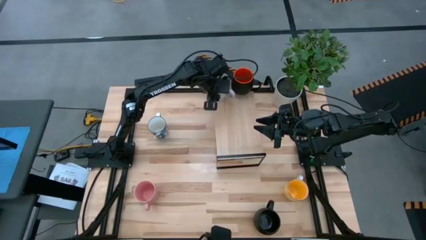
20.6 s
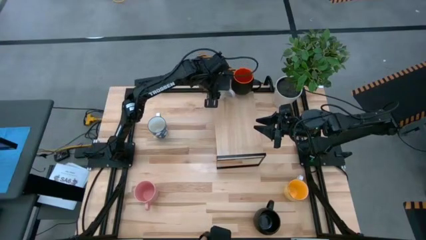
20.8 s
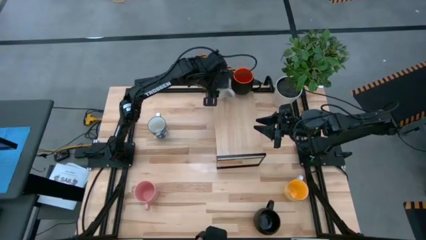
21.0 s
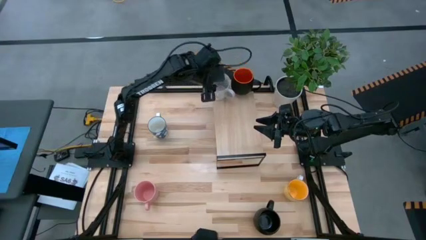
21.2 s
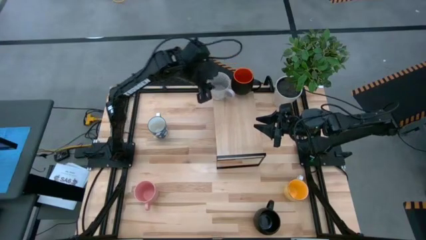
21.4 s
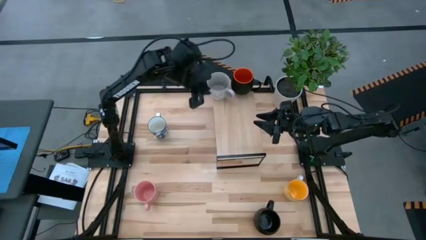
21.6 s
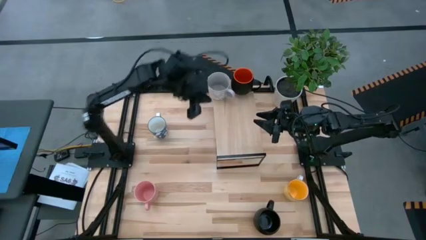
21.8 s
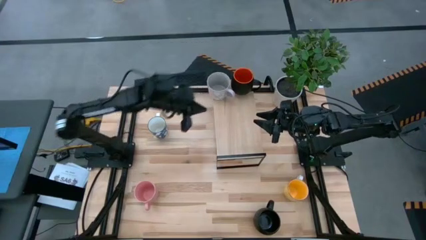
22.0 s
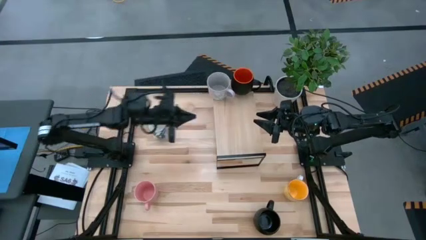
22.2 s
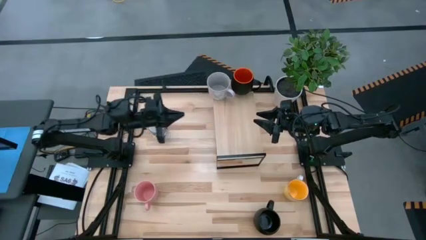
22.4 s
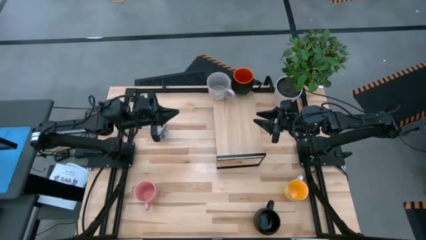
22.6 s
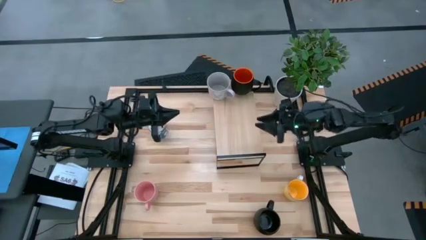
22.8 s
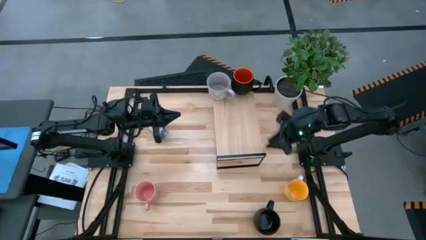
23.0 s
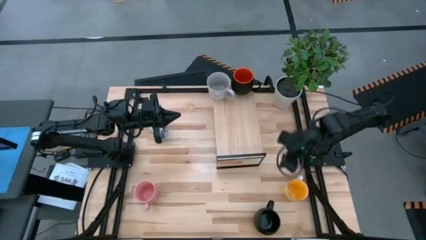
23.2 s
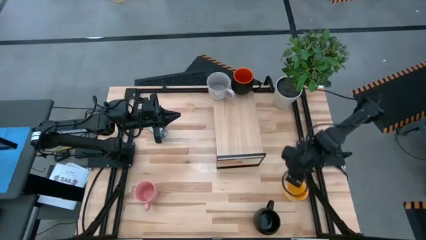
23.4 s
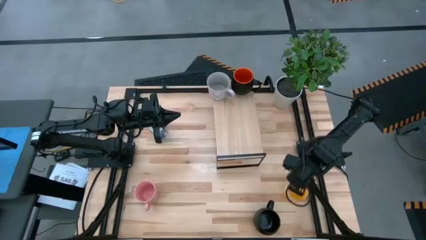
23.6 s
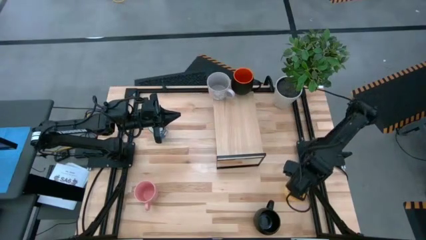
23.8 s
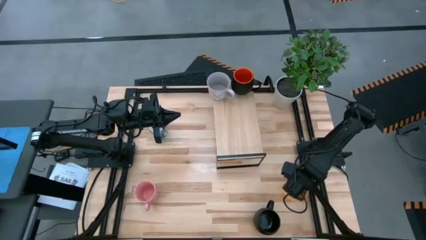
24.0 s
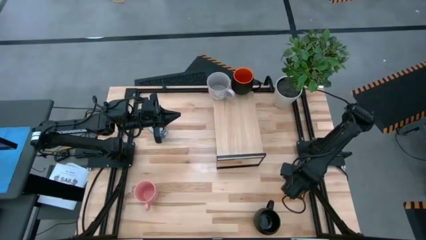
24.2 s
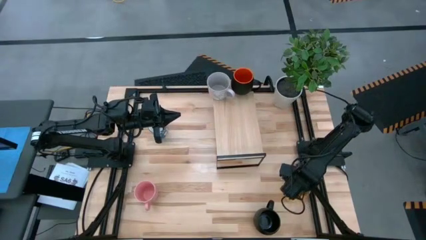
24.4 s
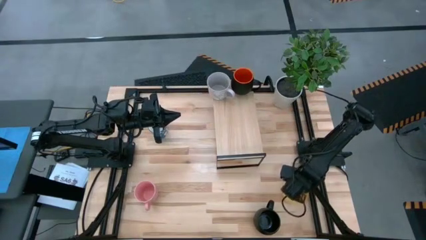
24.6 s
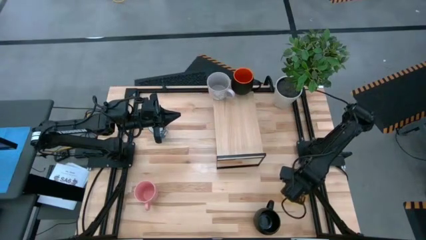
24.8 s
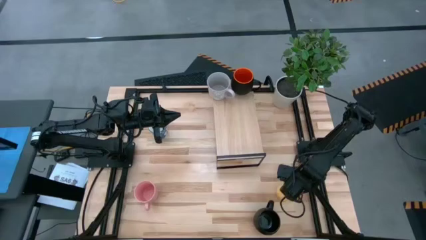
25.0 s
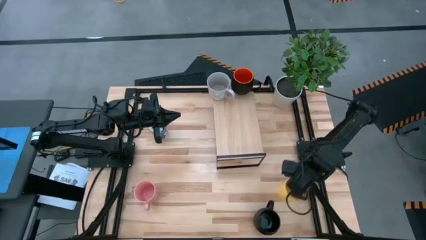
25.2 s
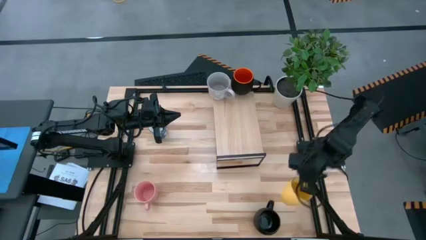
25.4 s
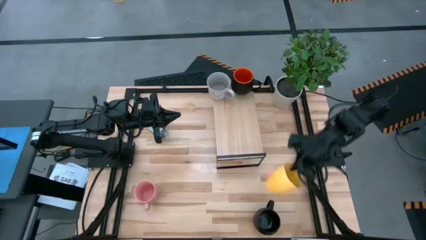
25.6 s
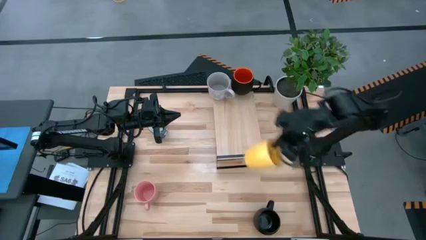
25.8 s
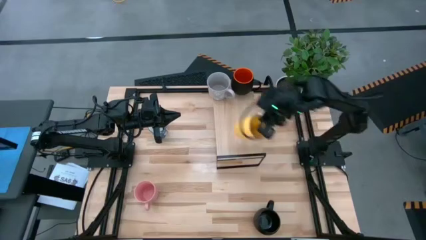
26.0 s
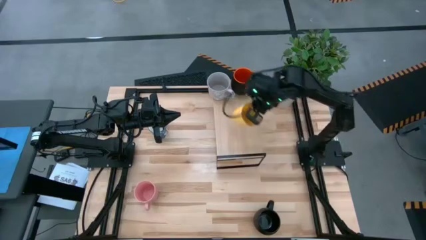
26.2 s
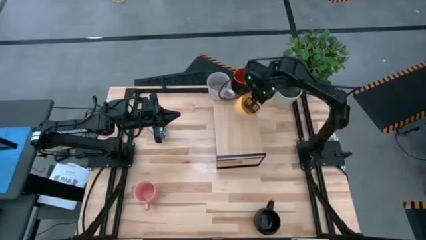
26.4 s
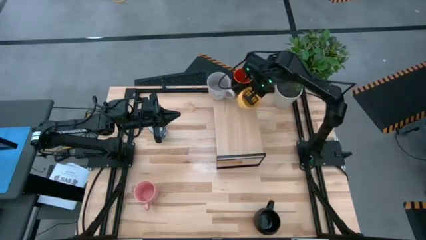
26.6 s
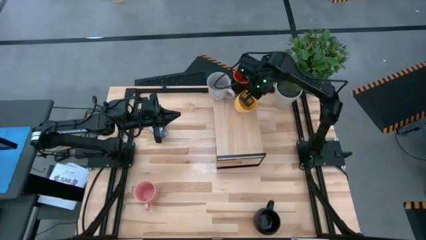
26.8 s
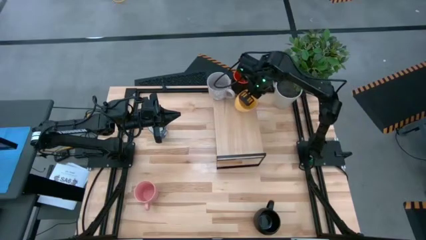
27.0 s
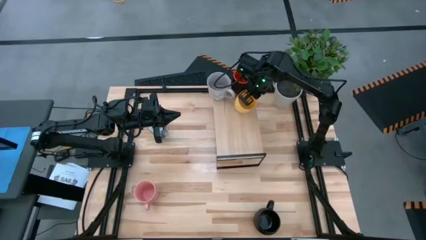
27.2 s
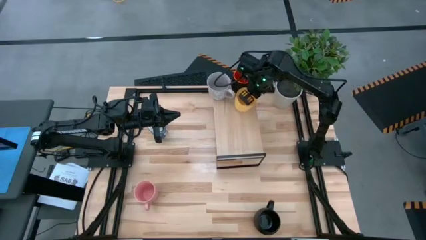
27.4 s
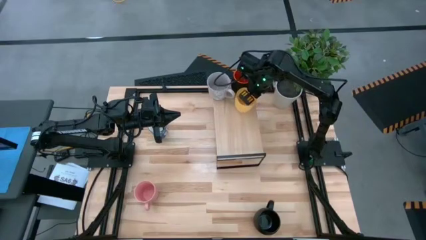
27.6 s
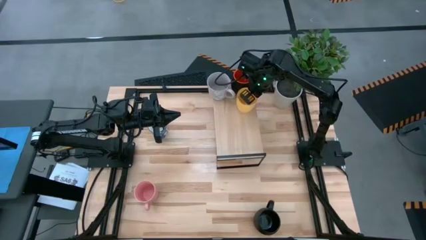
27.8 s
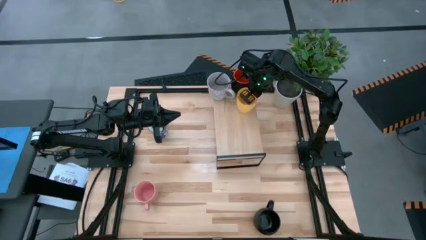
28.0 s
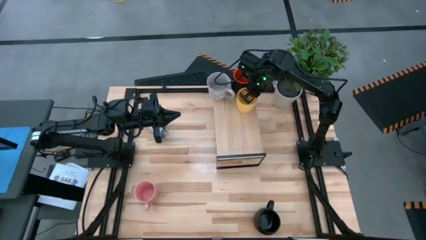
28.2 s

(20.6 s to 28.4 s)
Task: Place coffee mugs
Put the yellow mug on the shelf

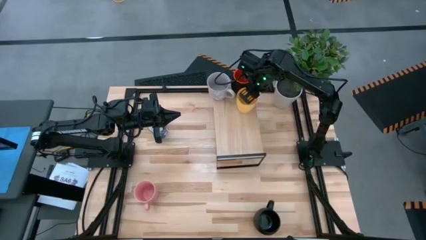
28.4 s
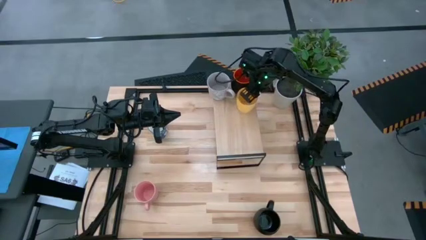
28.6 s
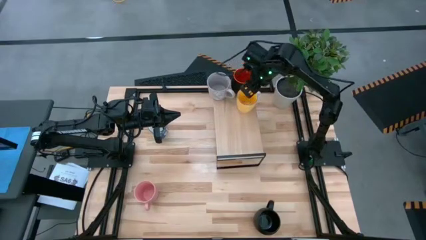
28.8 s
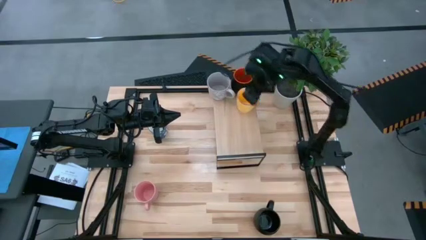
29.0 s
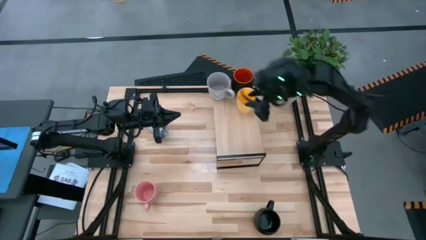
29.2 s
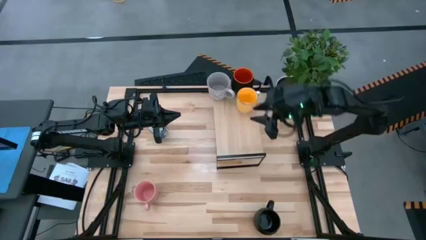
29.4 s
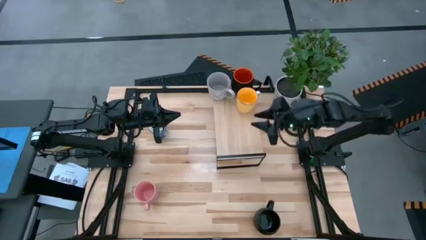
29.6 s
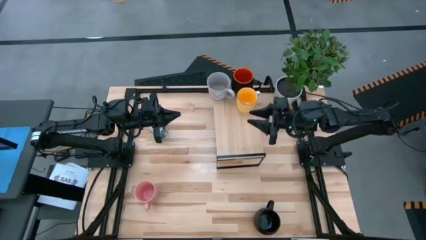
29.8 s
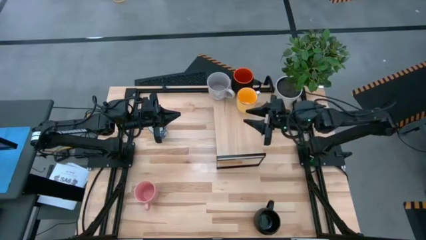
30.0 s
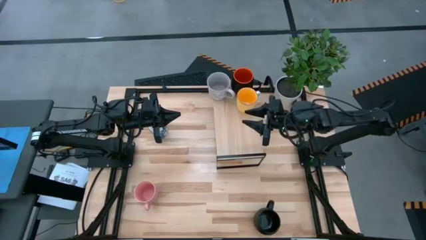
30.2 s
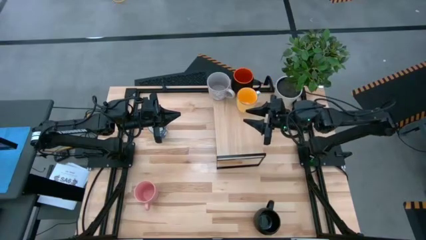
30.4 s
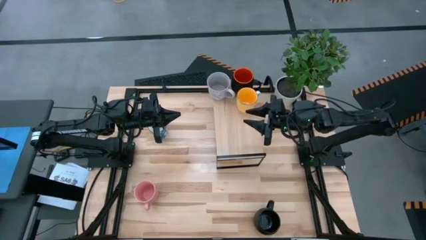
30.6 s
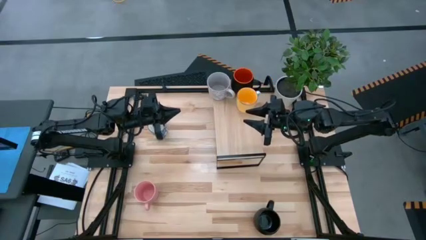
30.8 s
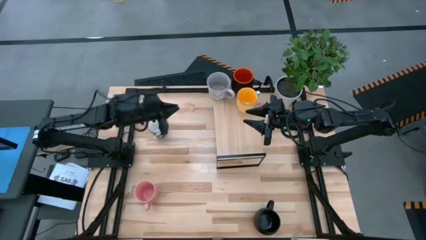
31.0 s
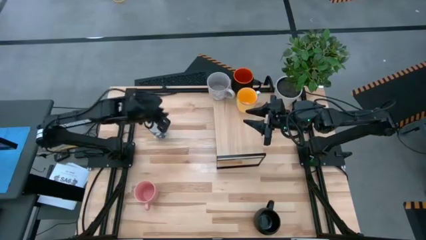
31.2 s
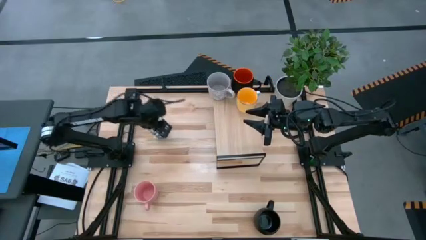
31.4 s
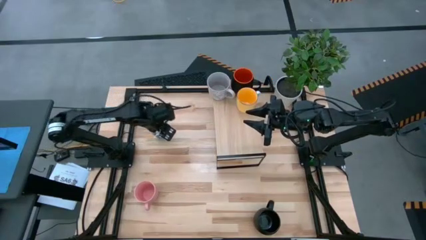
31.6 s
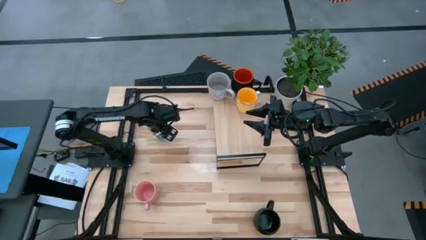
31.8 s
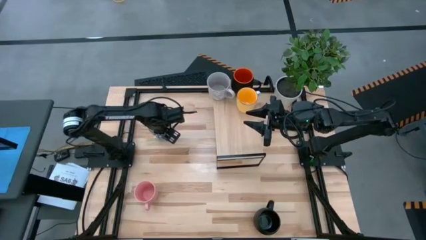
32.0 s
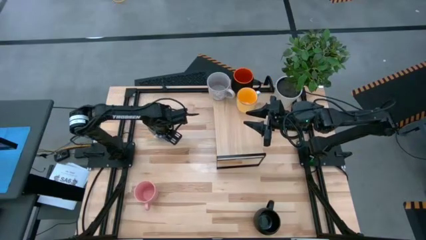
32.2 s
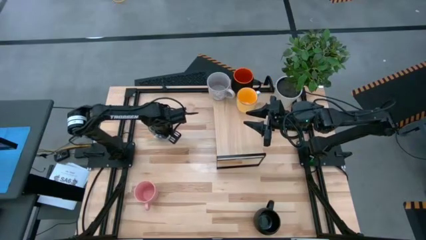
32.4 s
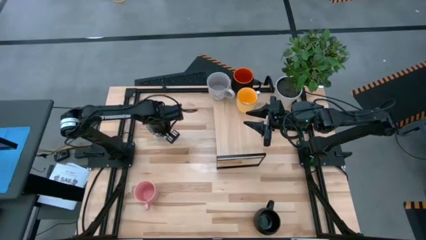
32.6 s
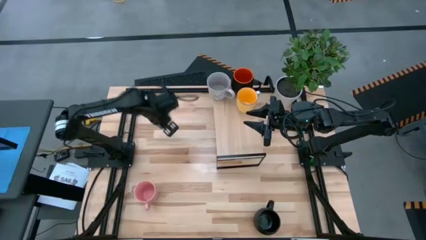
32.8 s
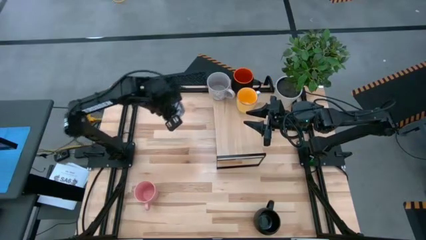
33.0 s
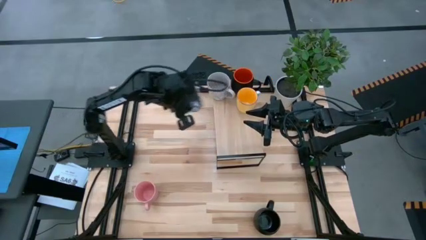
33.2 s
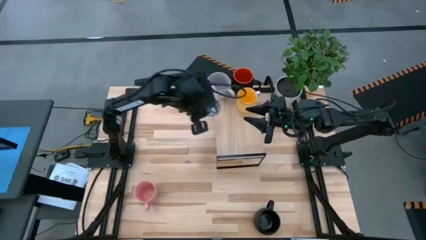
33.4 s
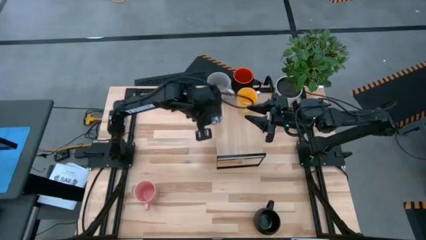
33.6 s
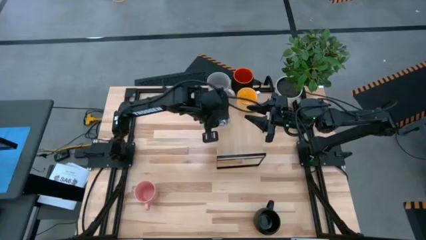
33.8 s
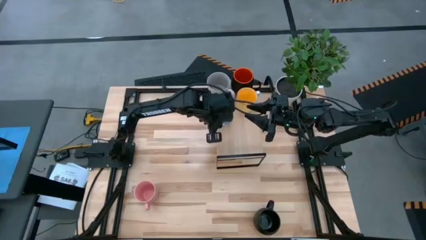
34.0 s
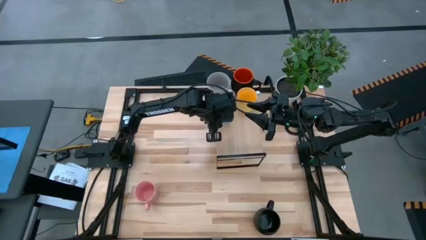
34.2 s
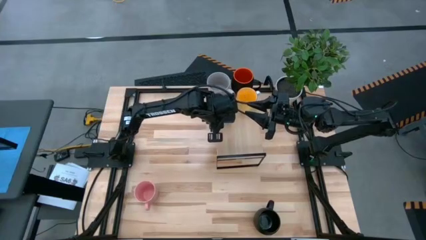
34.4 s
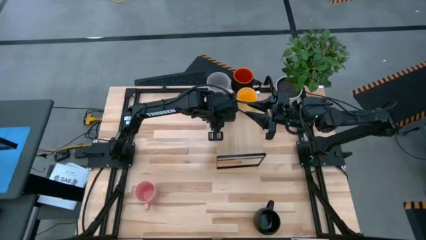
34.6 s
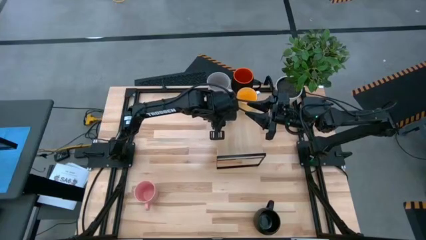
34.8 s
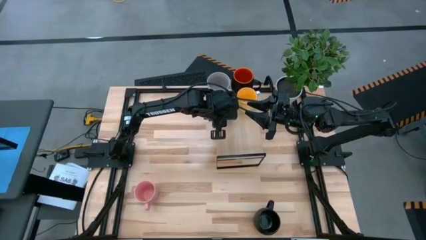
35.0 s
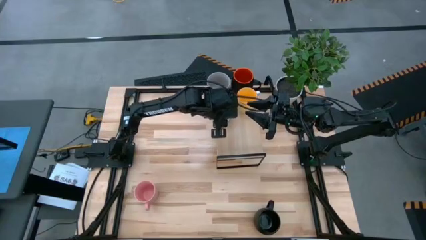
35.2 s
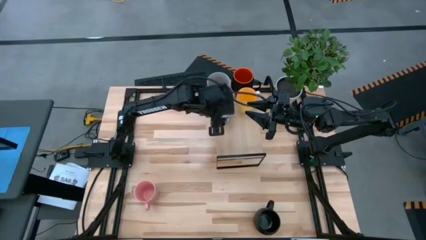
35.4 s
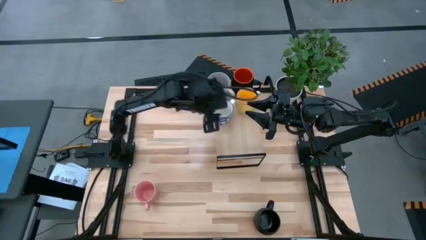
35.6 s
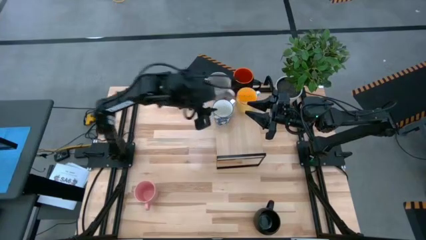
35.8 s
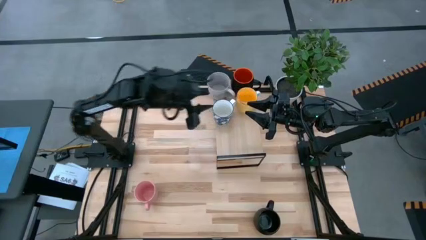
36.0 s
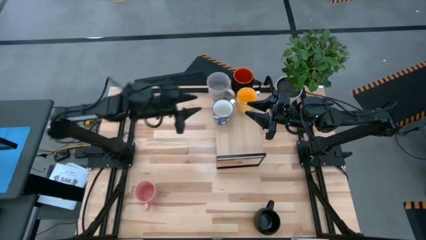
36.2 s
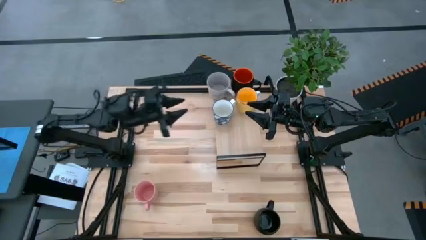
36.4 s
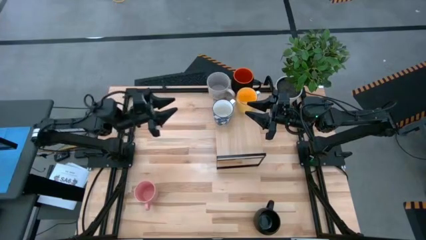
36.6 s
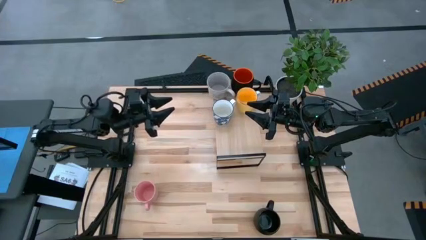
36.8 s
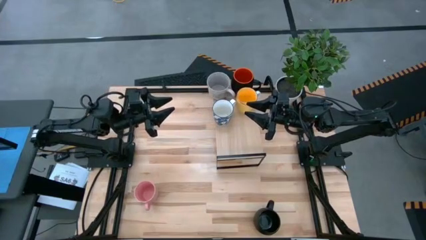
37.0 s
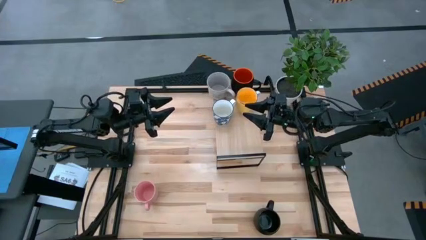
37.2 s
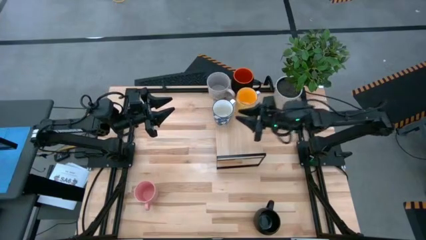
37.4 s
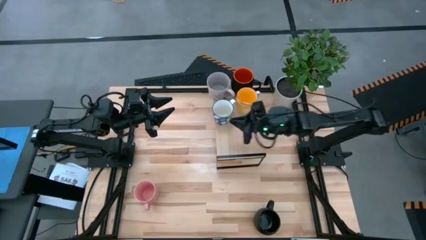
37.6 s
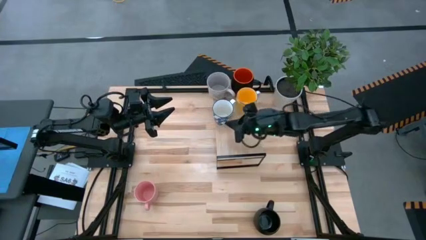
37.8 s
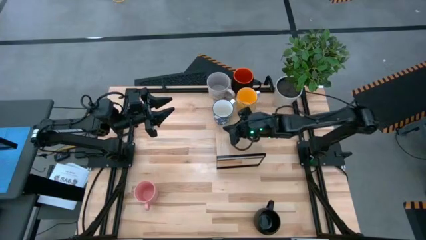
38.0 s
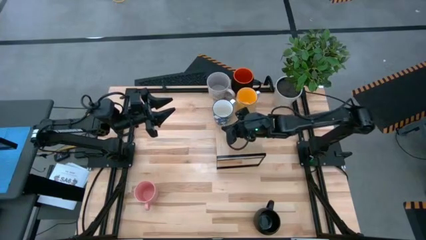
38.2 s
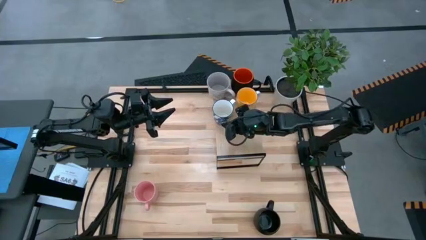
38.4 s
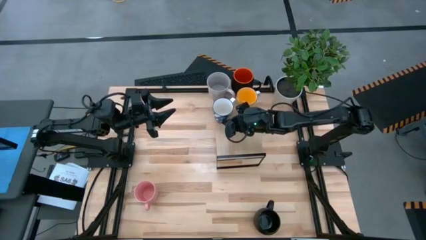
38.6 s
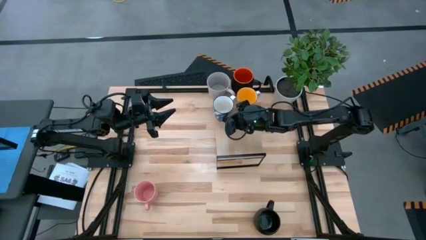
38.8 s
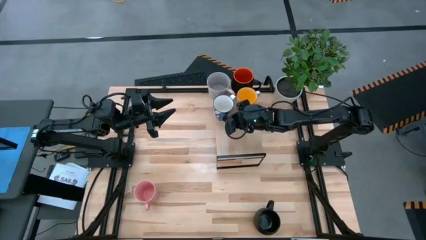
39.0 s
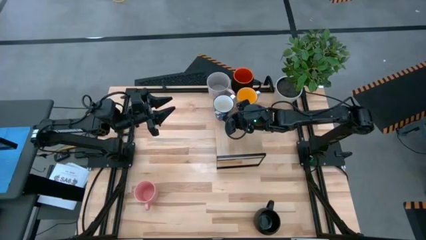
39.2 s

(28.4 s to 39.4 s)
Put the white patterned mug on the shelf
